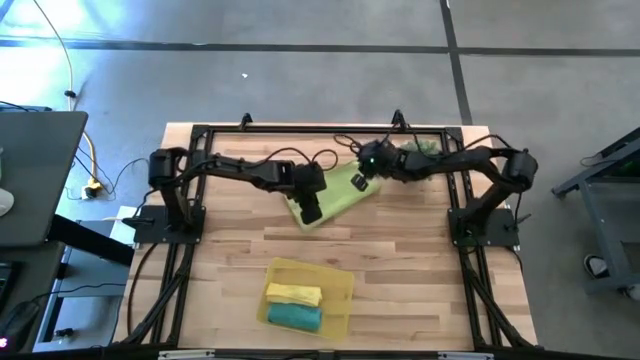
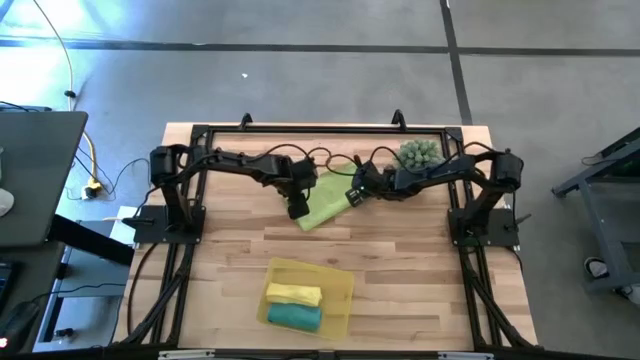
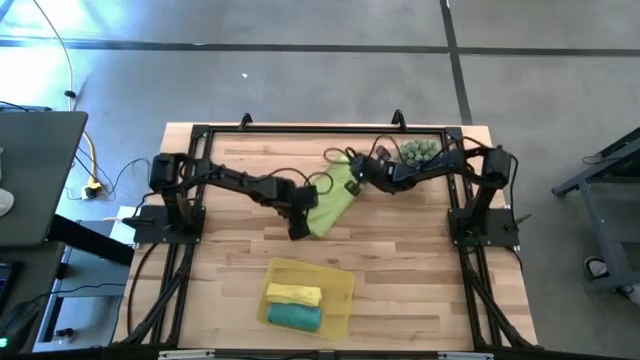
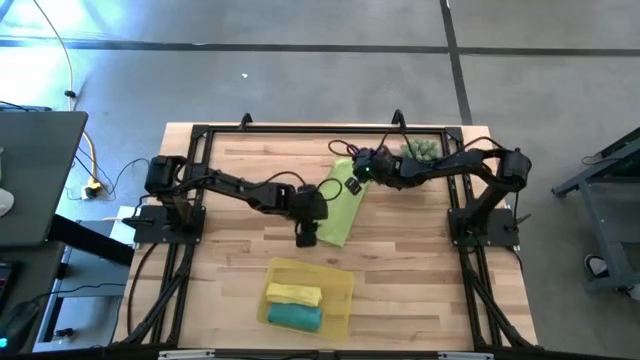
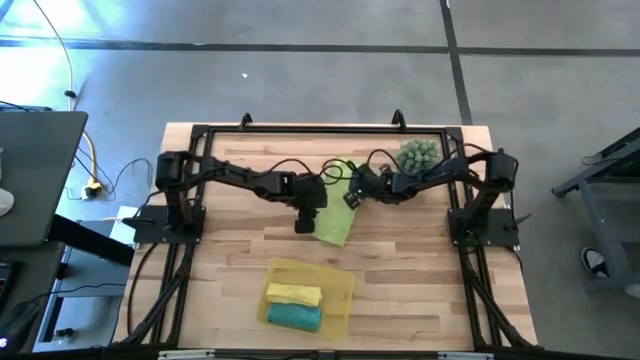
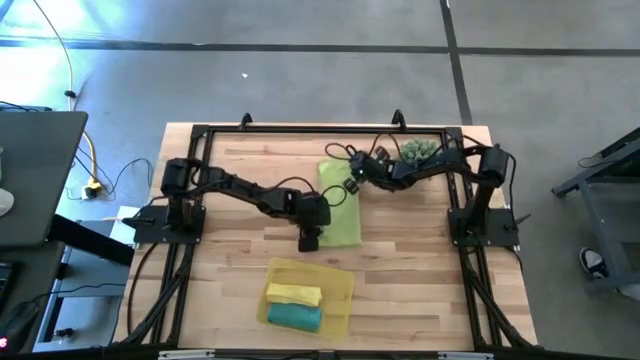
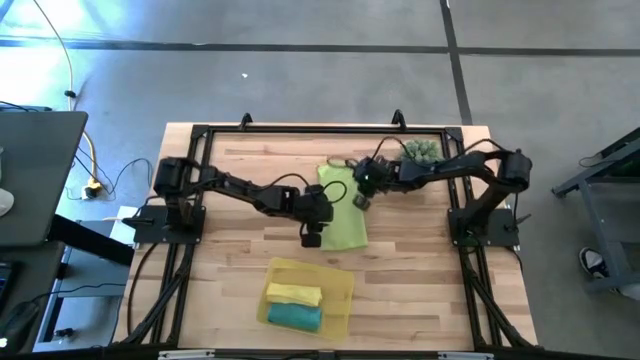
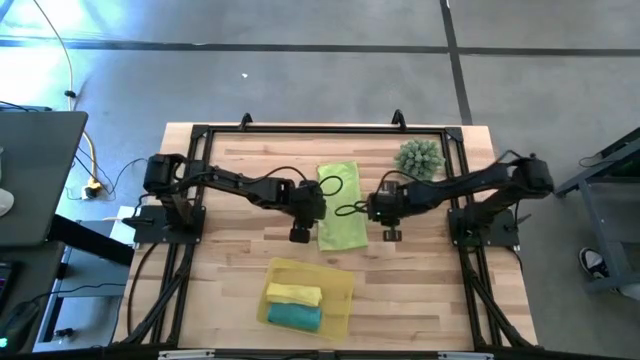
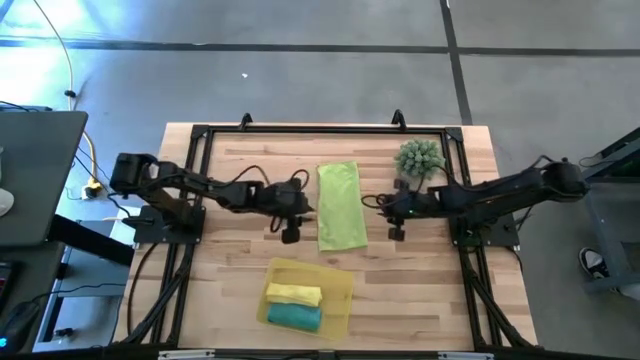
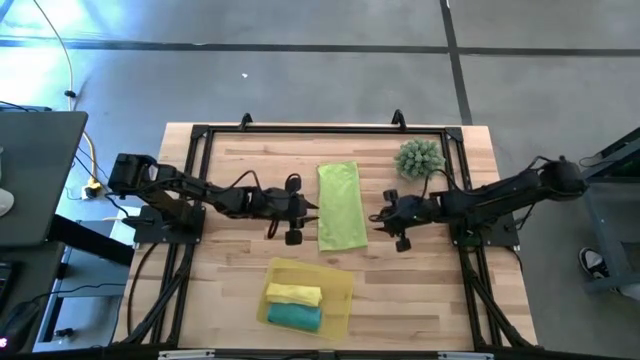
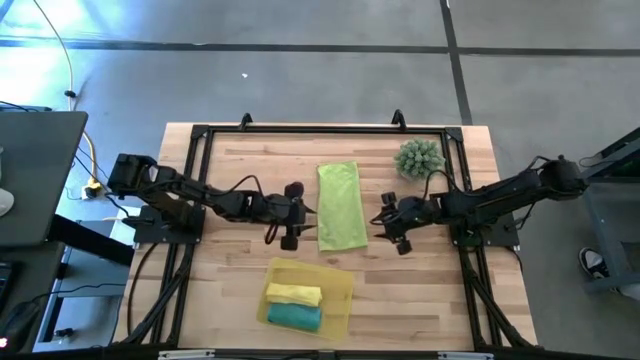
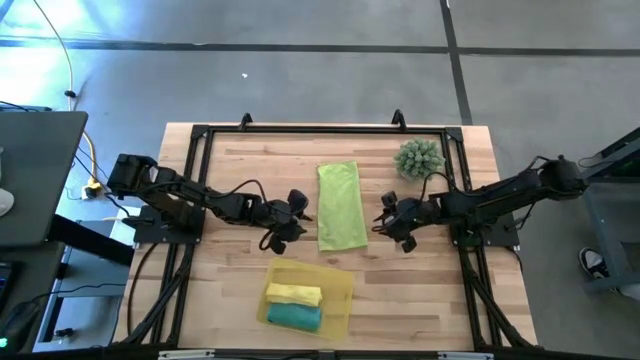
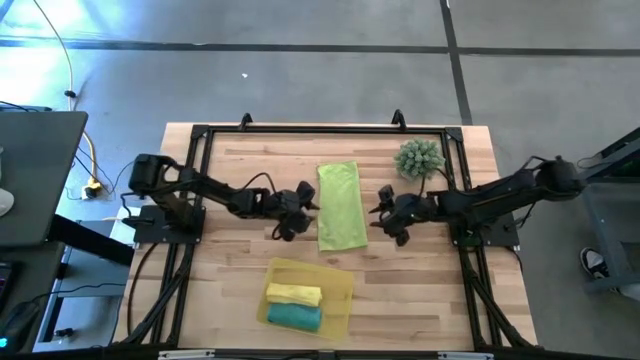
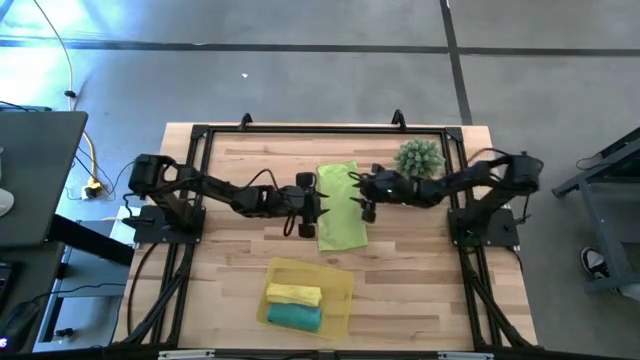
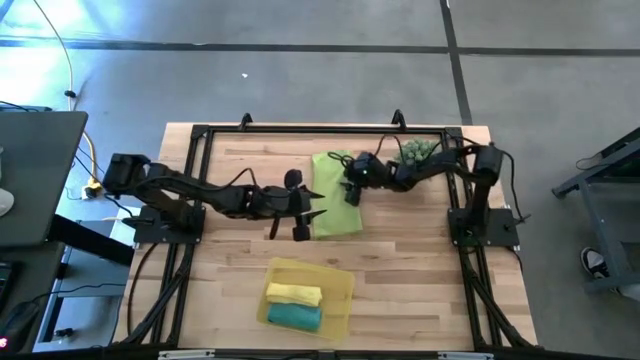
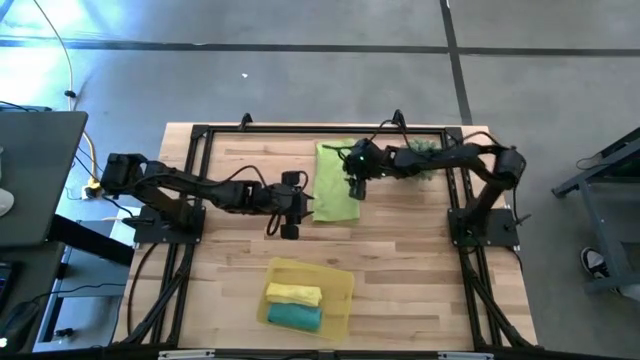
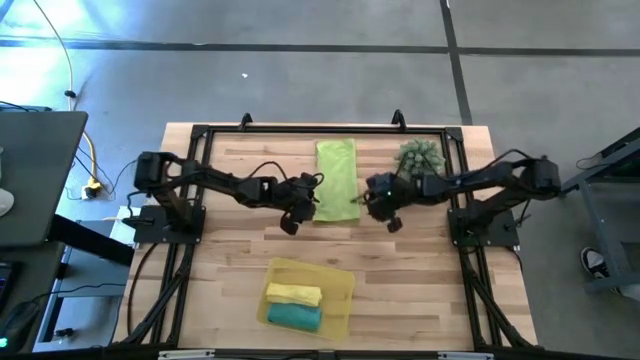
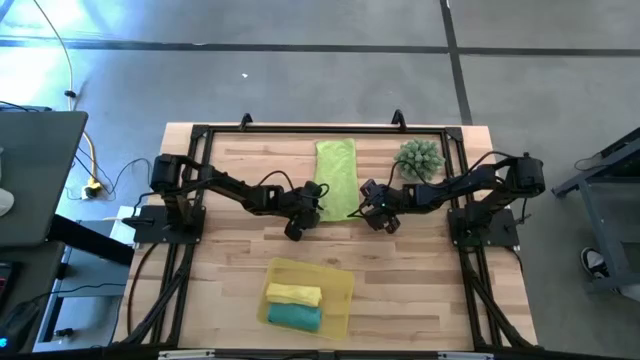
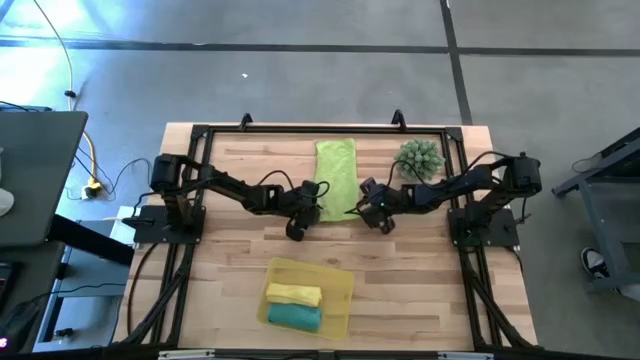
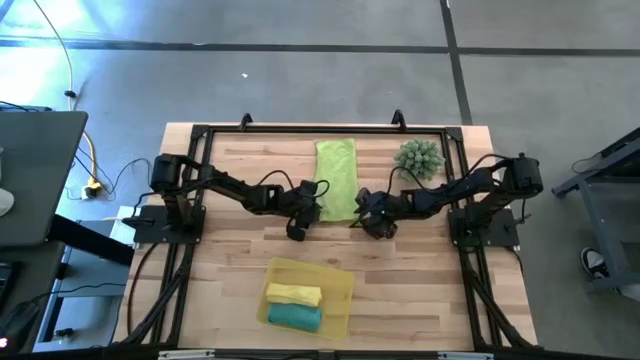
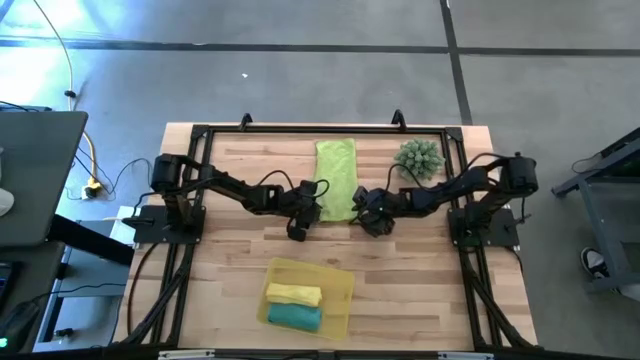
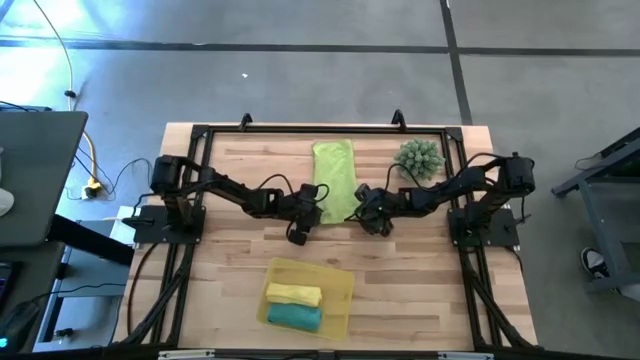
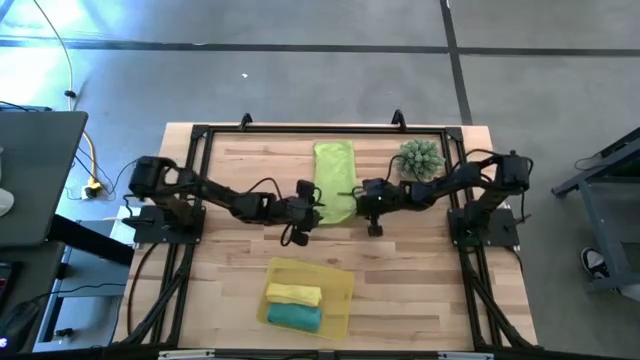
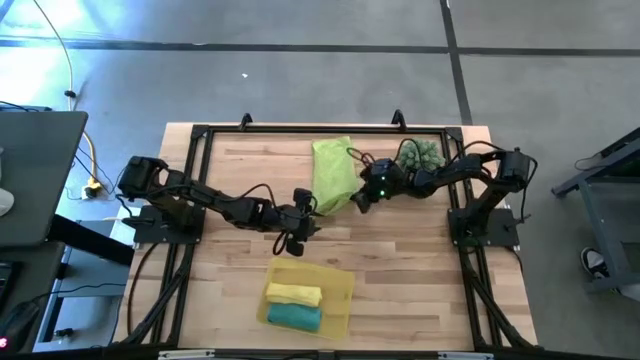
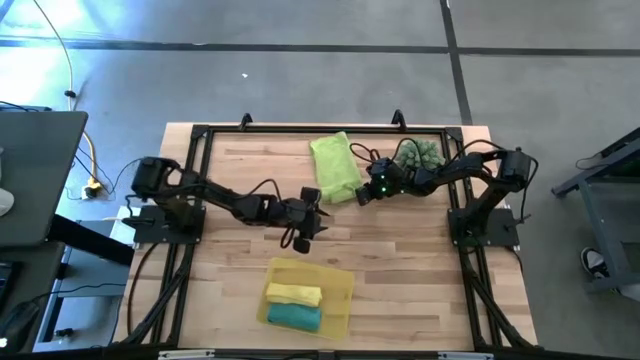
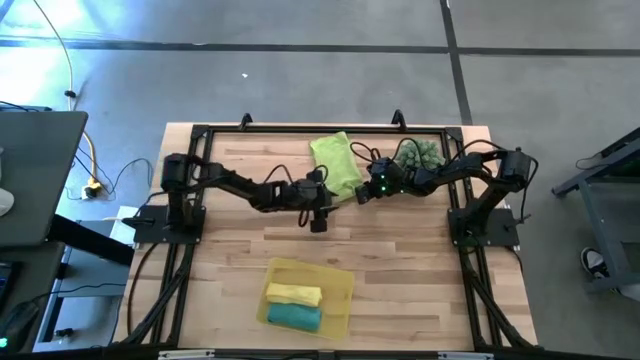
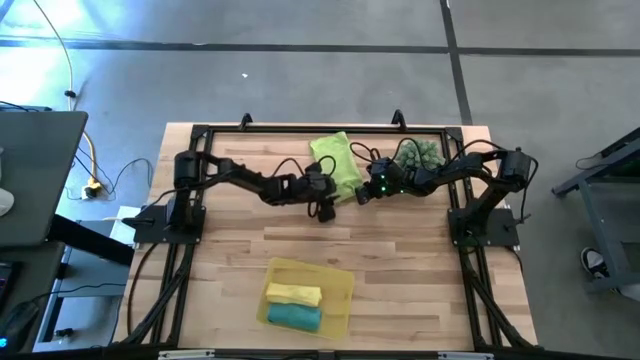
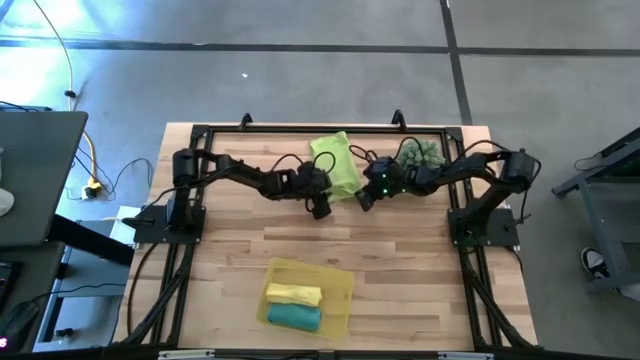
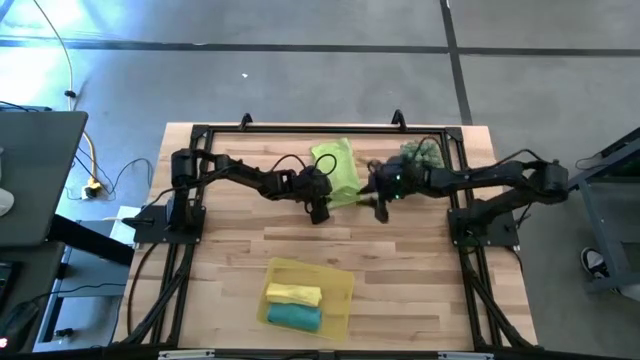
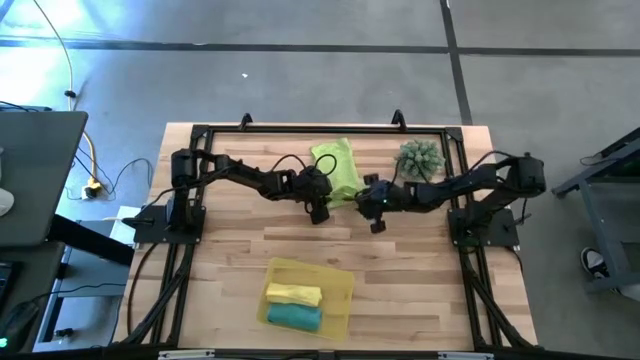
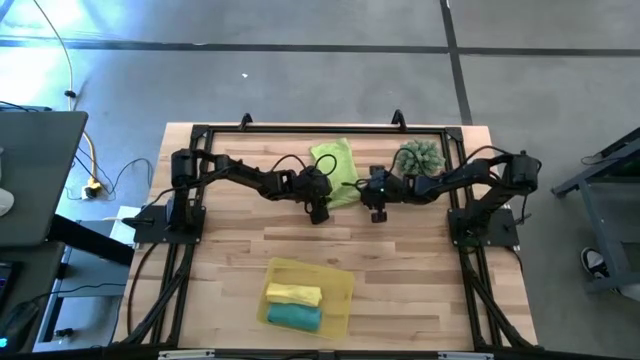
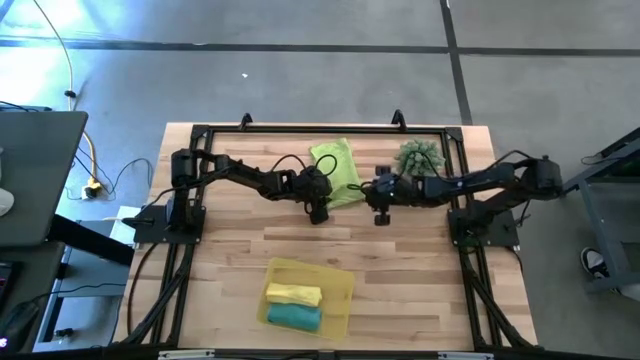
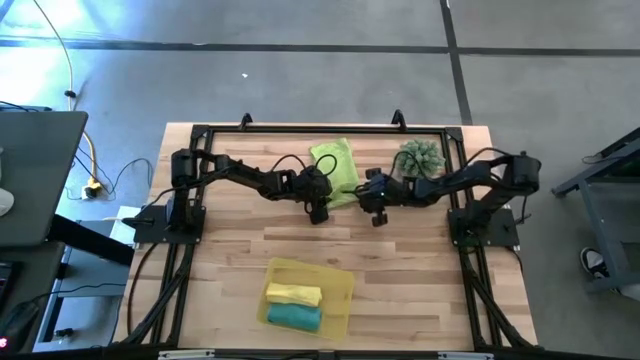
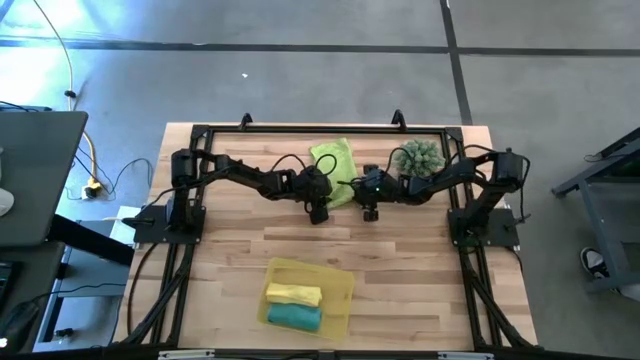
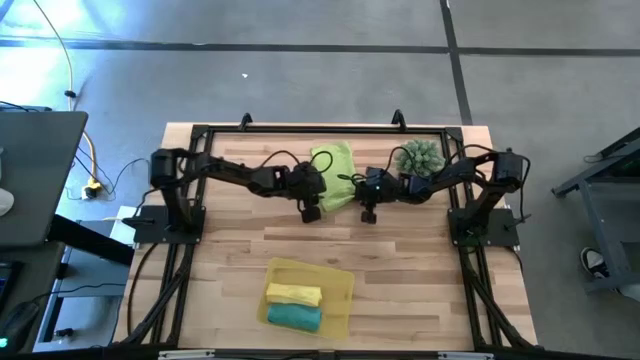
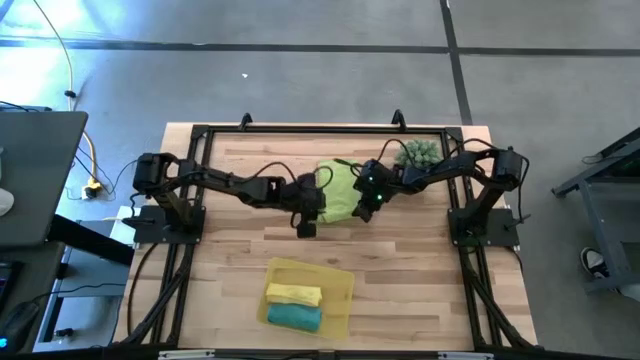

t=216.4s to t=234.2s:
Task: Roll microfiber towels into tight, uniform cylinder then place into a basket
Roll the green towel

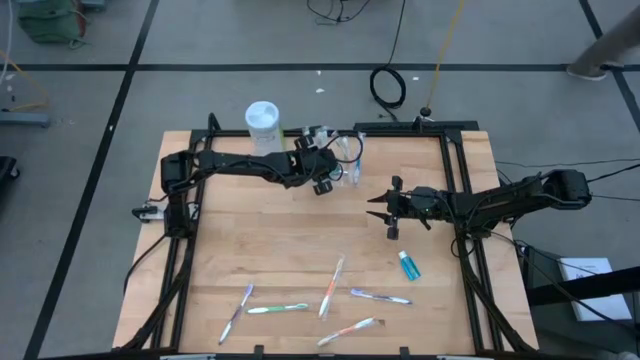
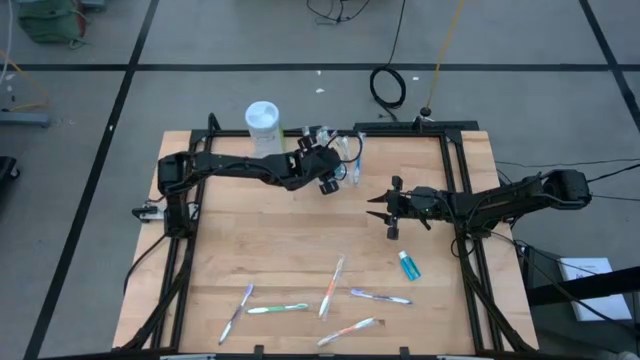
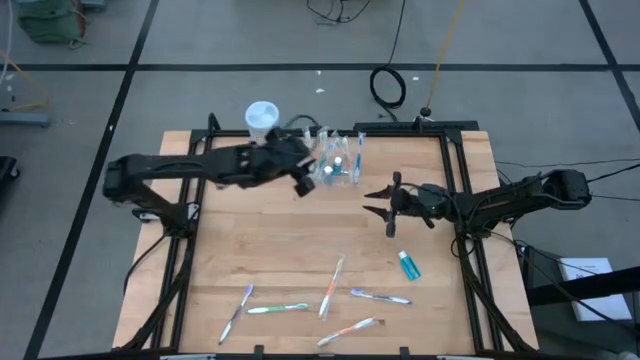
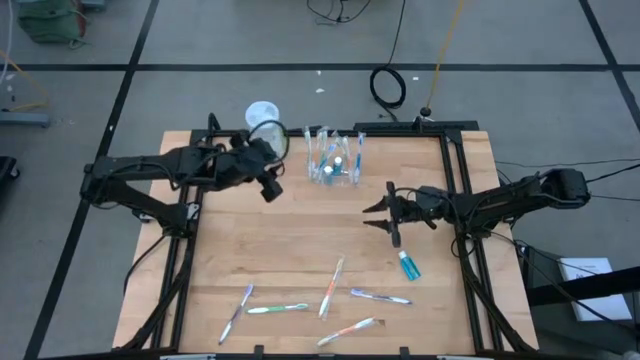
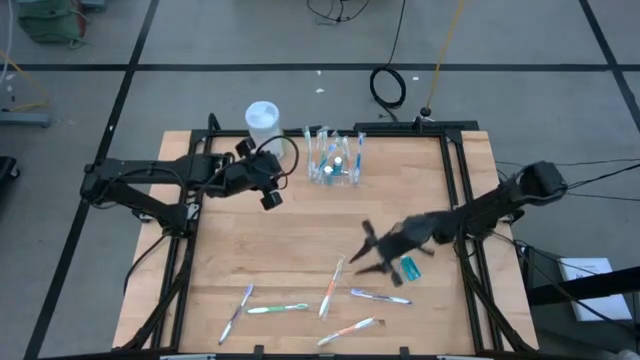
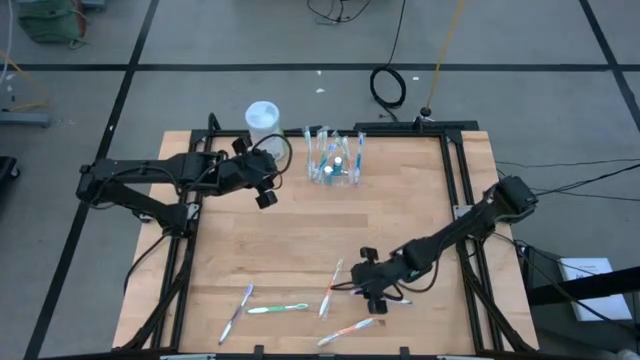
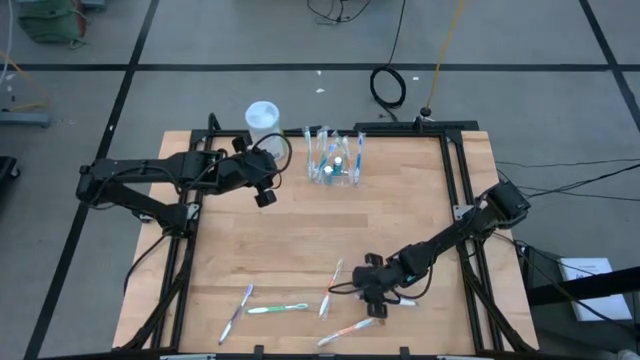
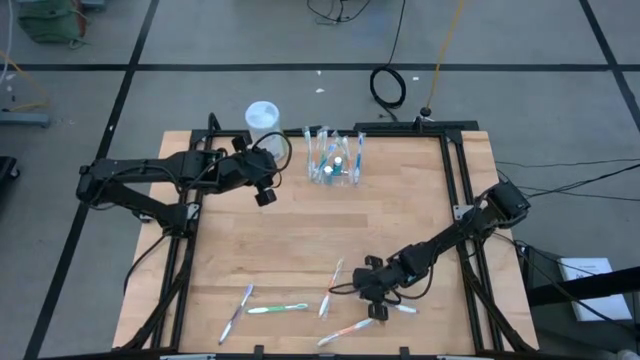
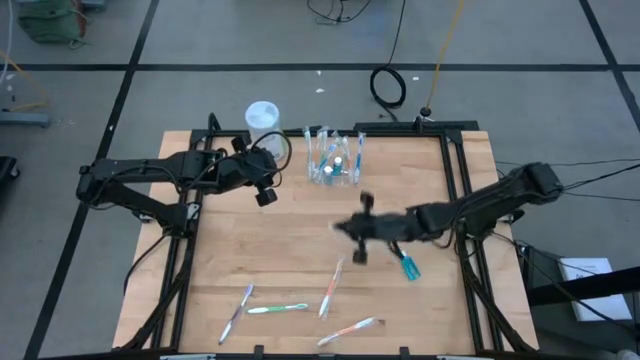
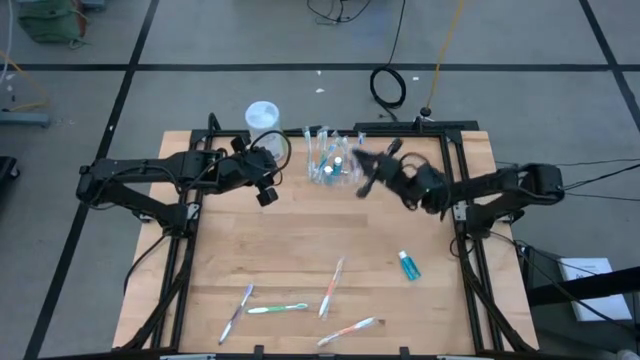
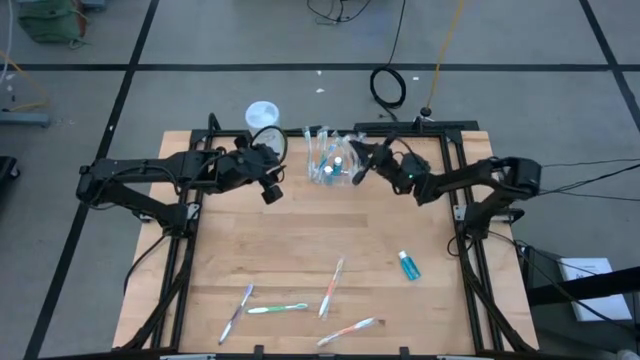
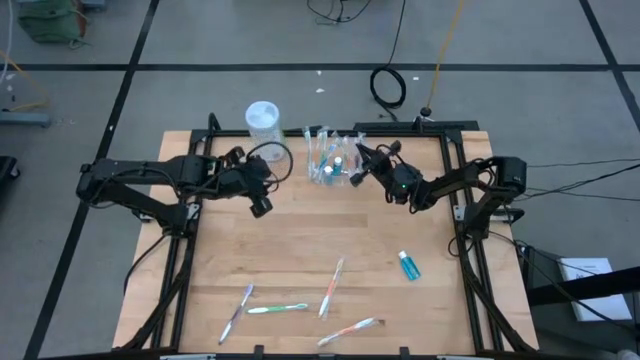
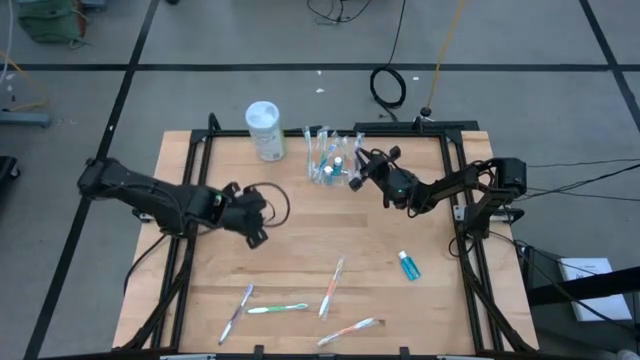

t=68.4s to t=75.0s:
Task: Pick & Place toothbrushing station
Put the violet toothbrush into the transparent organizer
